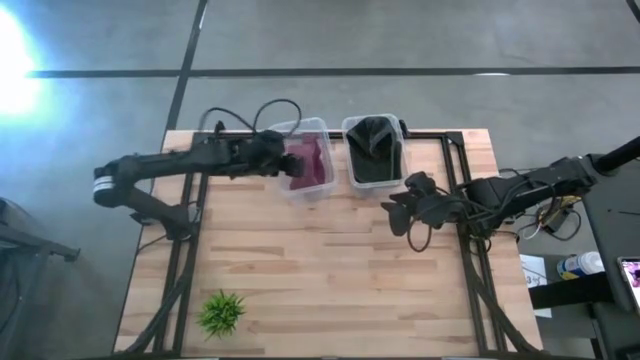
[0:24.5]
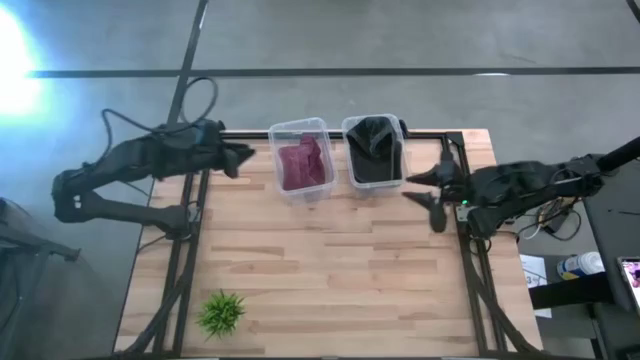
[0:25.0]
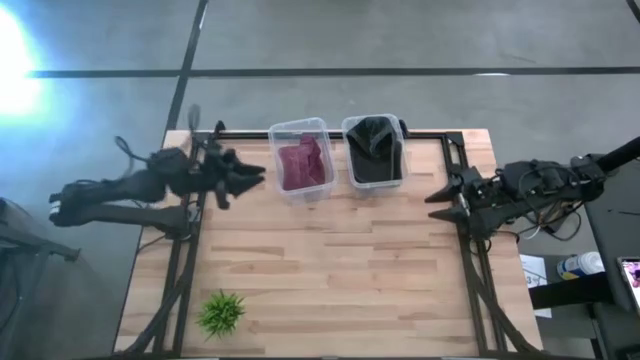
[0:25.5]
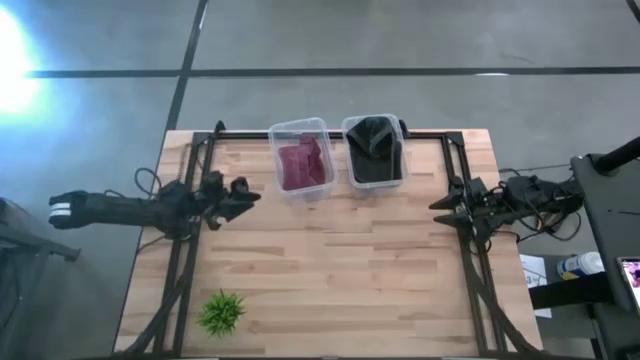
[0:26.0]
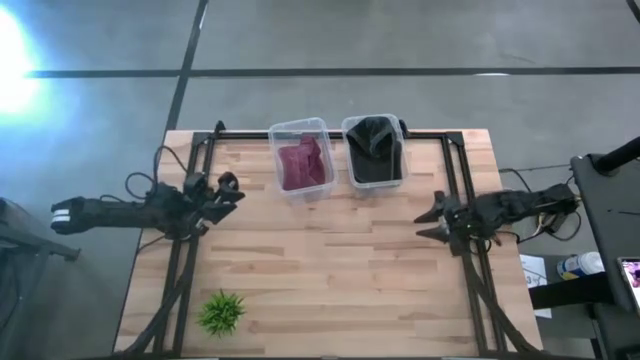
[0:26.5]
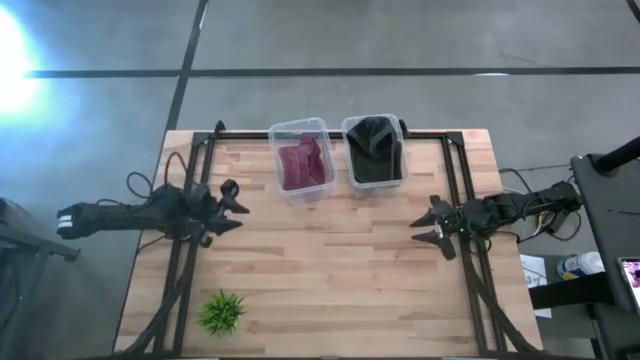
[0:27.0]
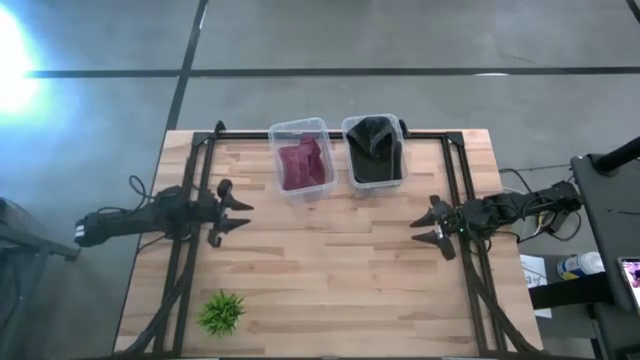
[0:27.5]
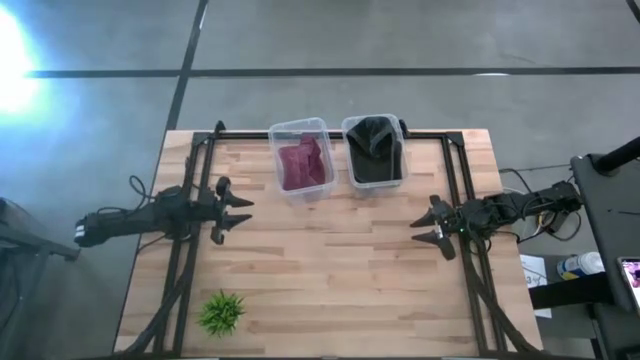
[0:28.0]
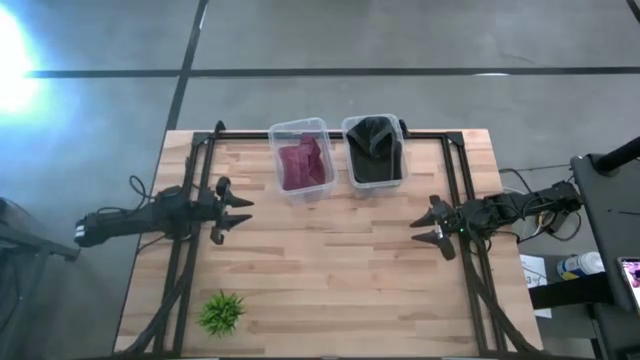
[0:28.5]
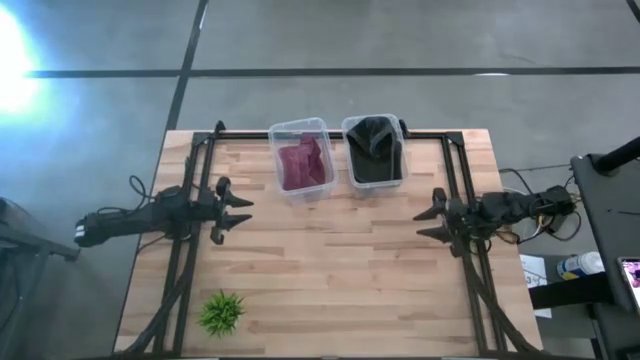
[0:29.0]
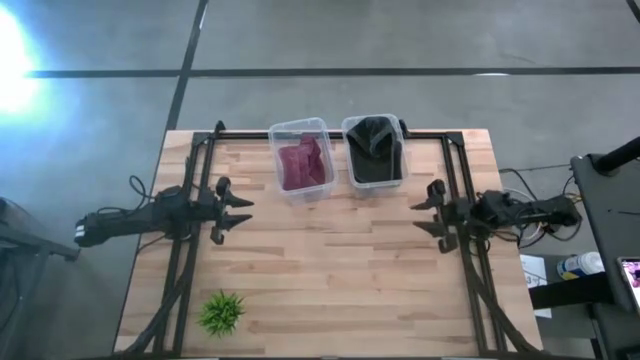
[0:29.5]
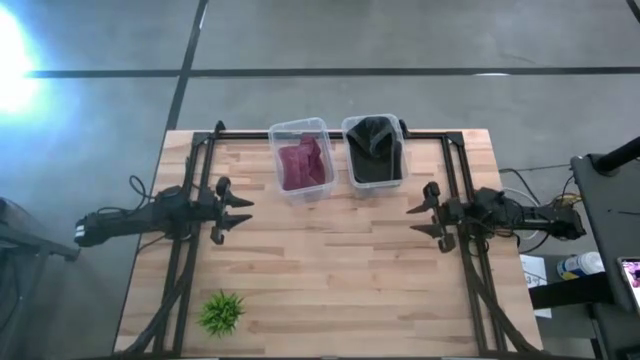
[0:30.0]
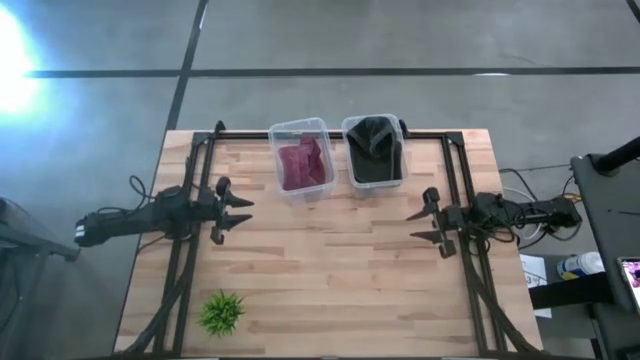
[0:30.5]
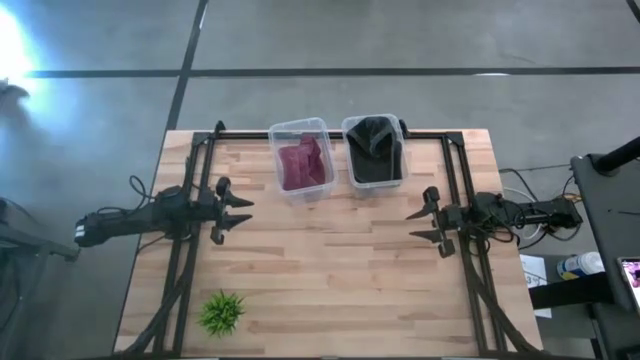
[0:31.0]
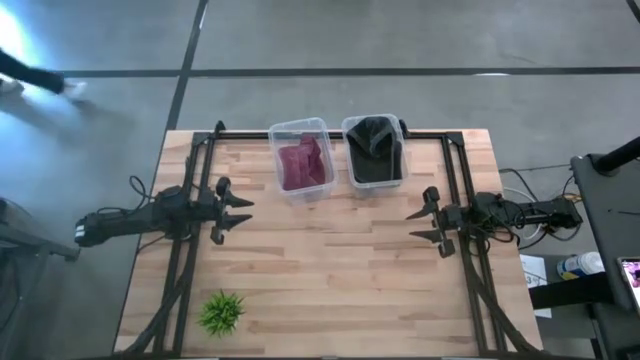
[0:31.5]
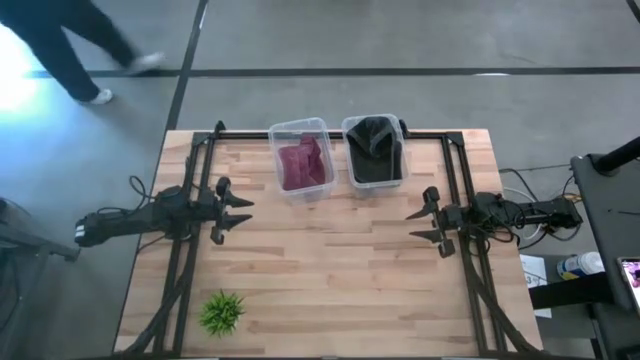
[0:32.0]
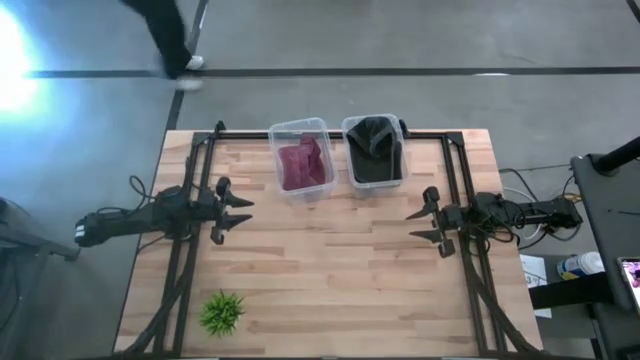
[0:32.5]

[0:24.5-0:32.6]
Task: Pick & Place hat
Return to Home Position

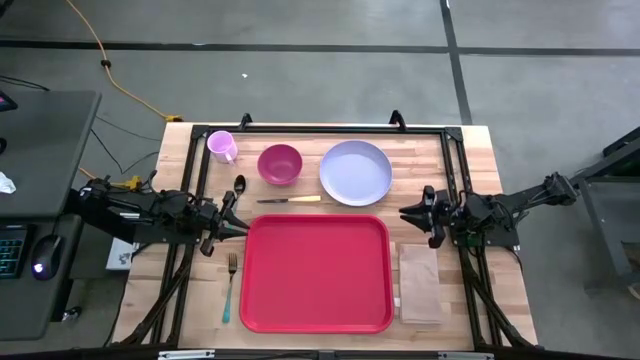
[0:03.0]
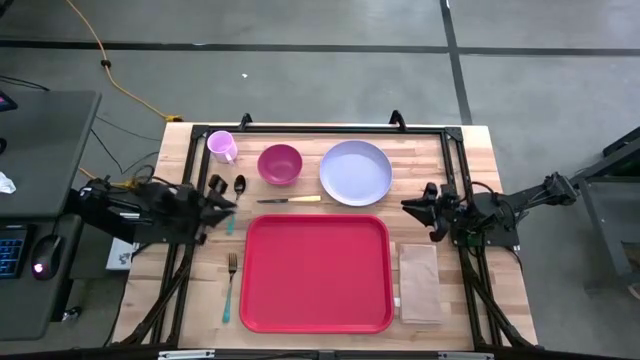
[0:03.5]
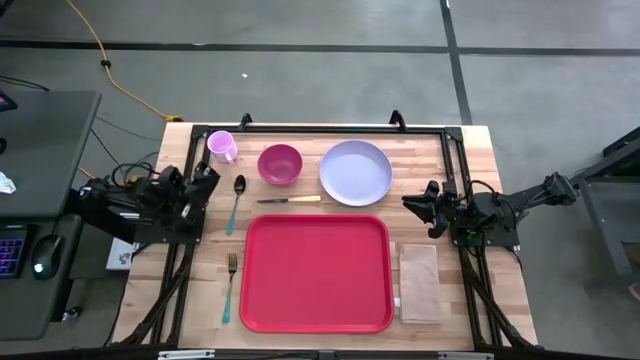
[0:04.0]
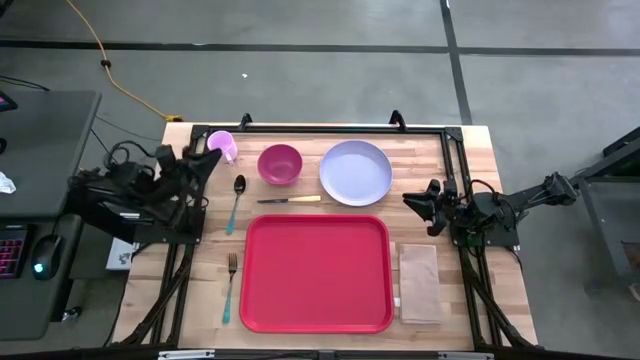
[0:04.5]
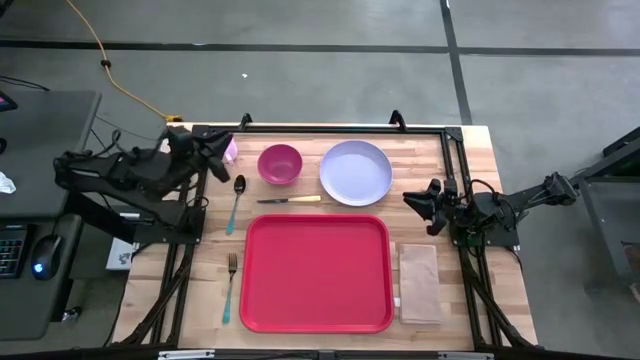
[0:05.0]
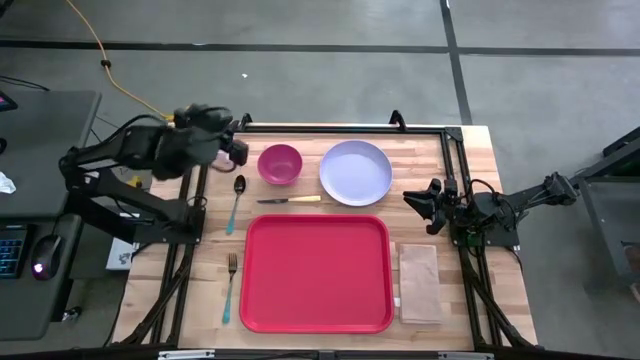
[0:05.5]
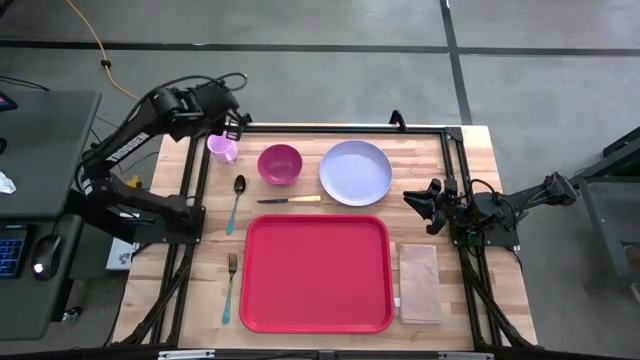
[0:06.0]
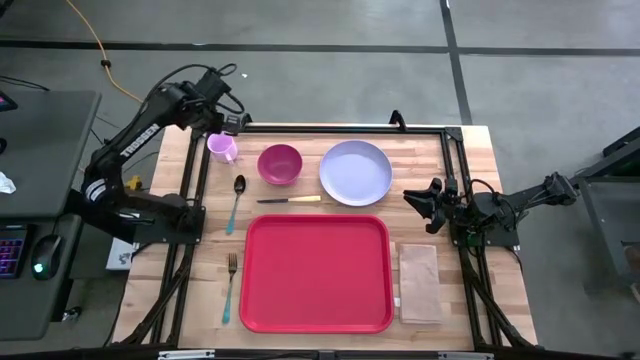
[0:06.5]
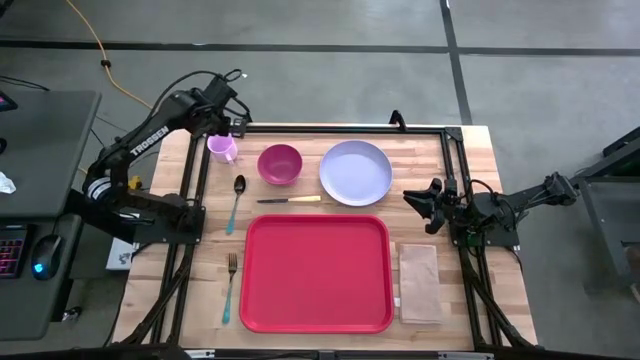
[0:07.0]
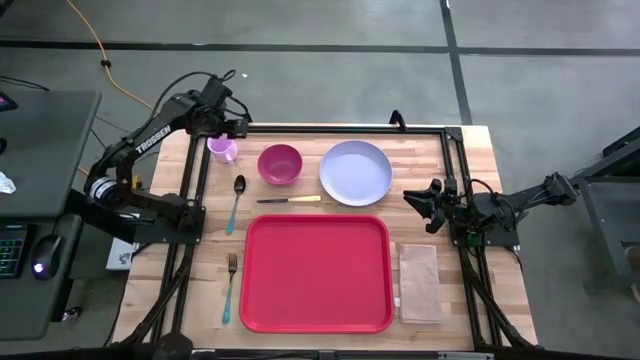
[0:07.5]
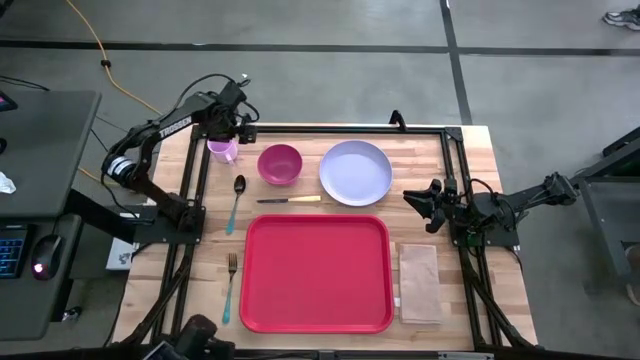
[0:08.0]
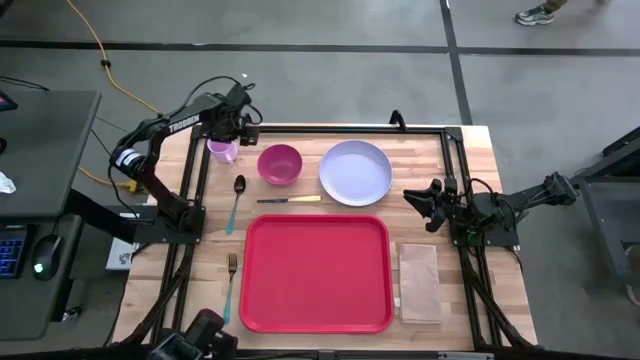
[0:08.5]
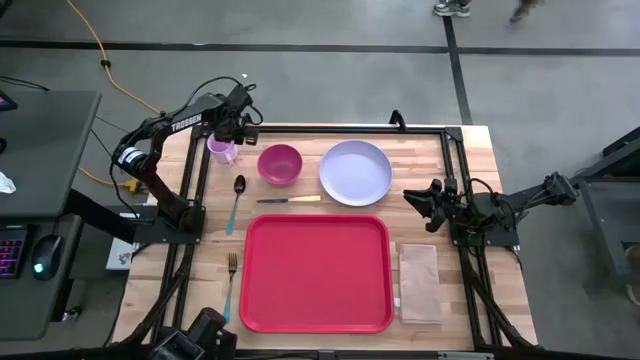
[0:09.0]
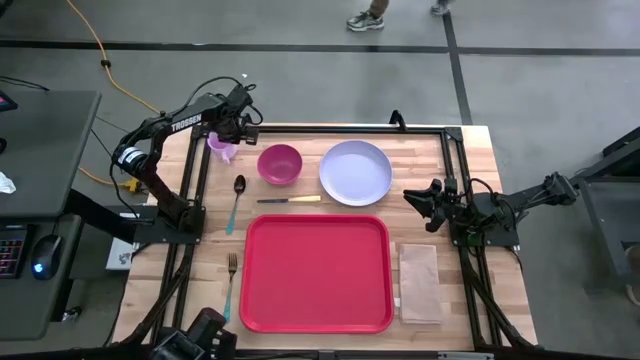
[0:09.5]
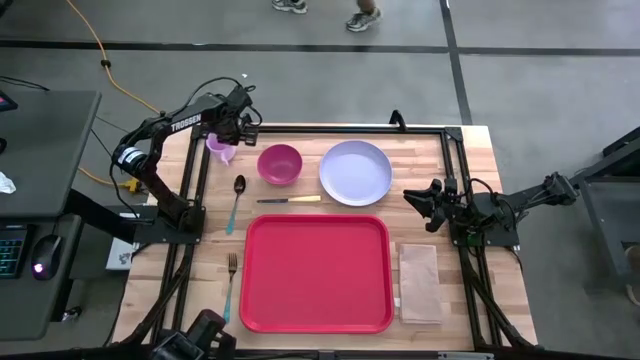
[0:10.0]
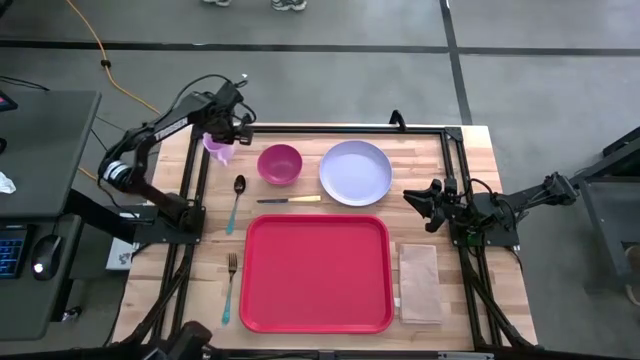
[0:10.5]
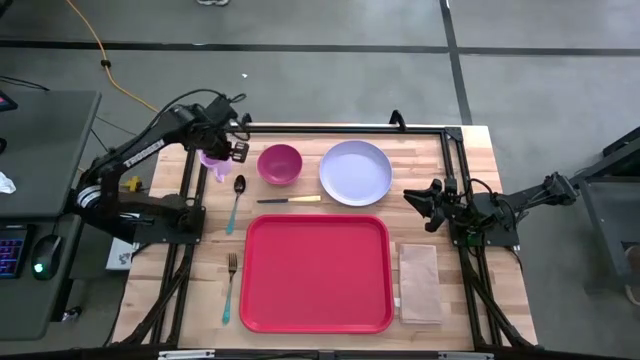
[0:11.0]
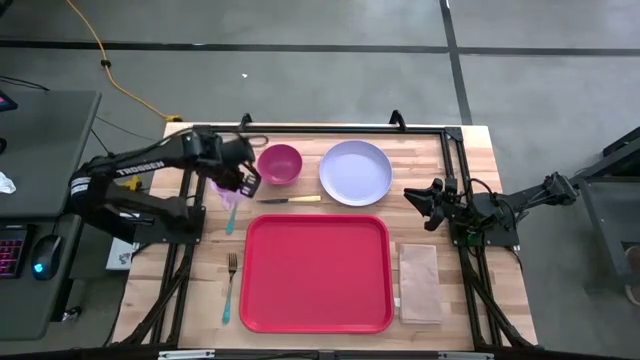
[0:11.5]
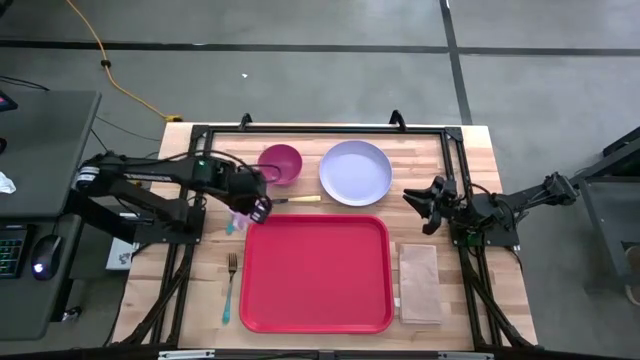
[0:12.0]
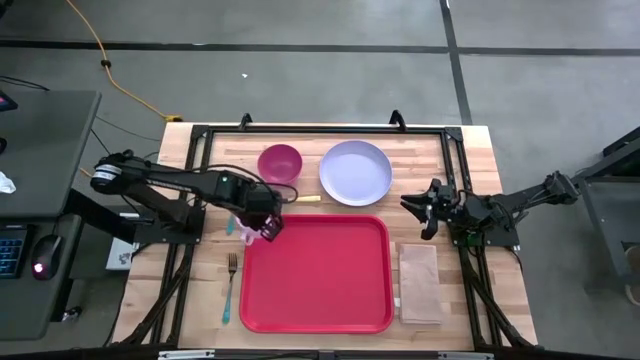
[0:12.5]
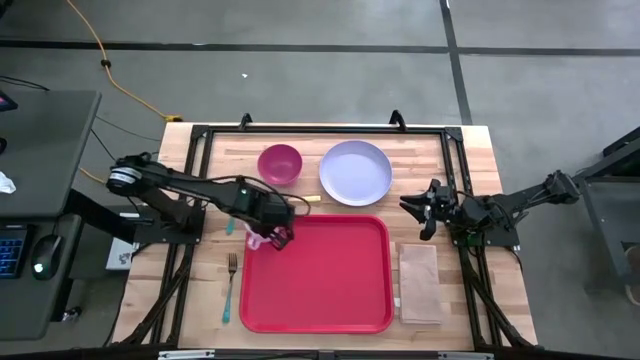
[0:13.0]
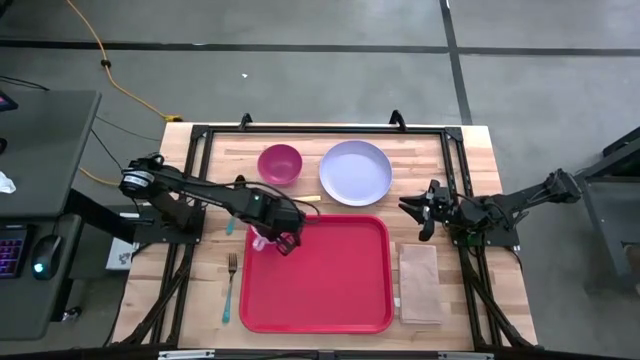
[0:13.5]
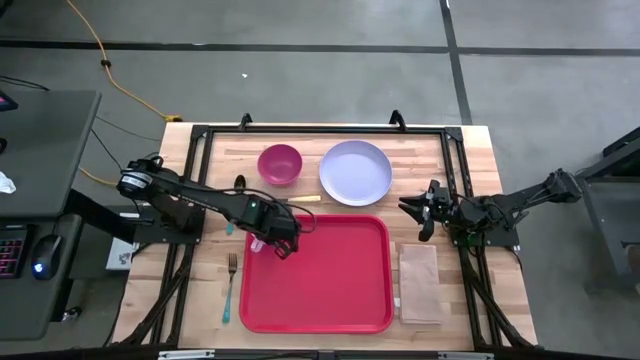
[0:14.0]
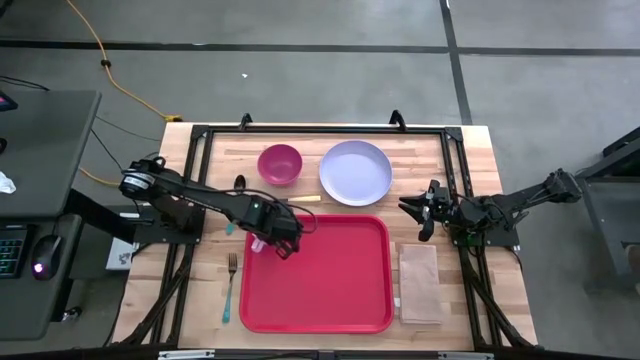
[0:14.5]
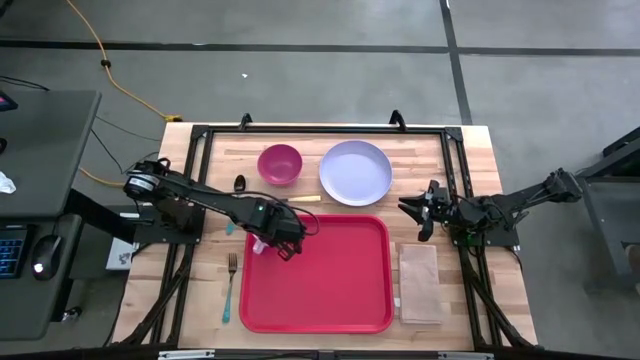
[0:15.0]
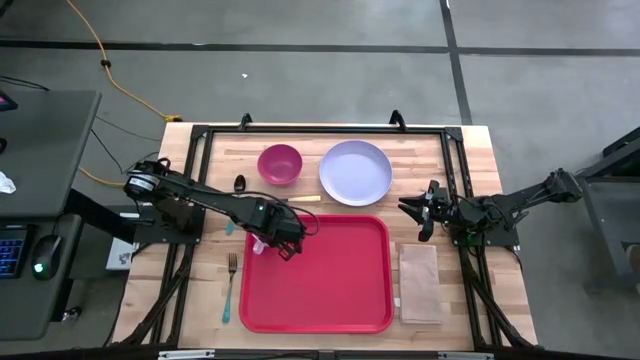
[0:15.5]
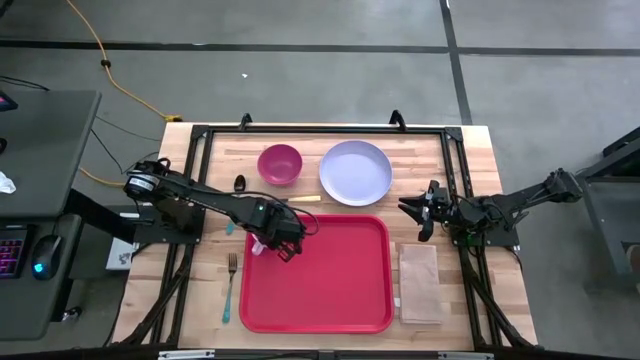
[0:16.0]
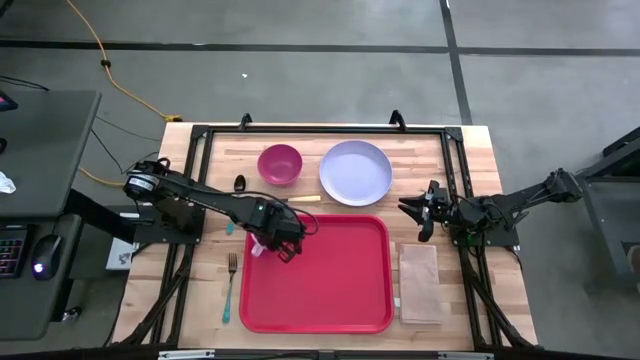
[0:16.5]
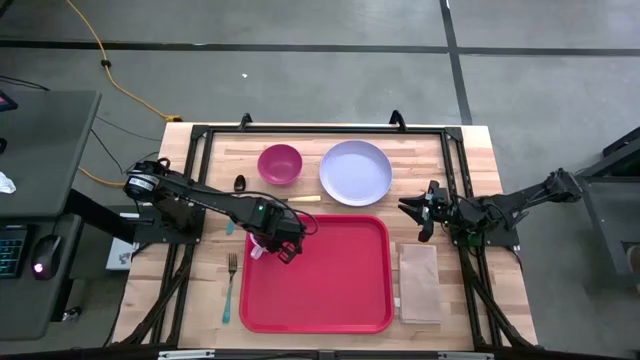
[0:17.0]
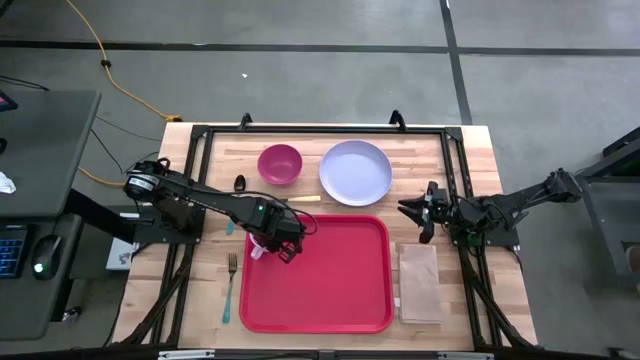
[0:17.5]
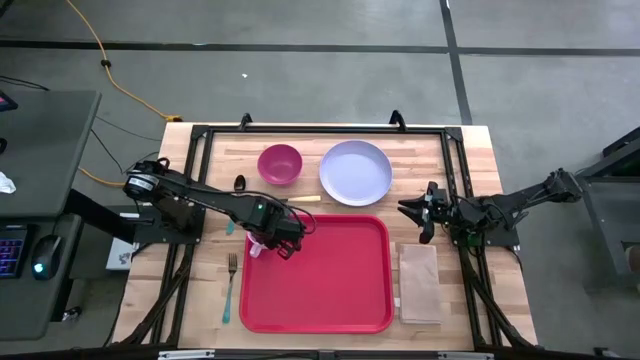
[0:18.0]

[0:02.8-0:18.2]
Task: Set up tray
Put the pink mug on the top left of the red tray
